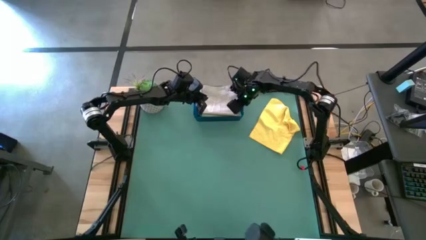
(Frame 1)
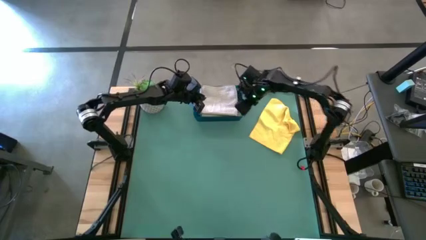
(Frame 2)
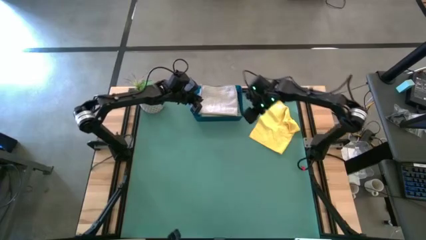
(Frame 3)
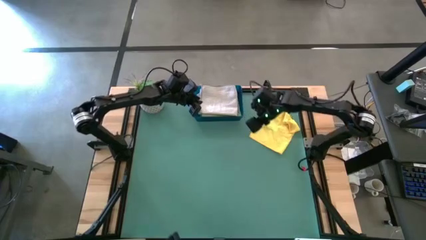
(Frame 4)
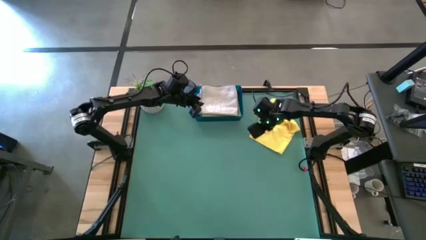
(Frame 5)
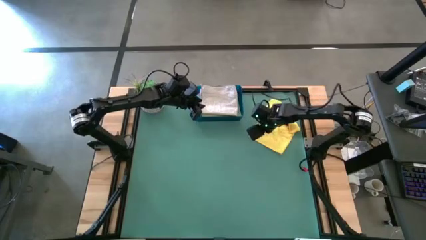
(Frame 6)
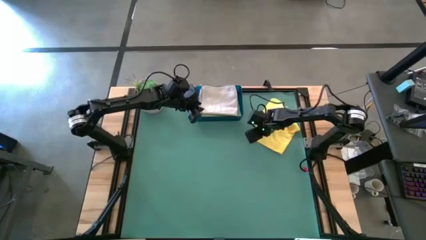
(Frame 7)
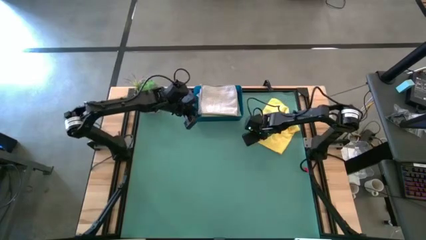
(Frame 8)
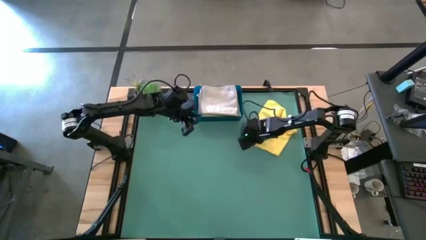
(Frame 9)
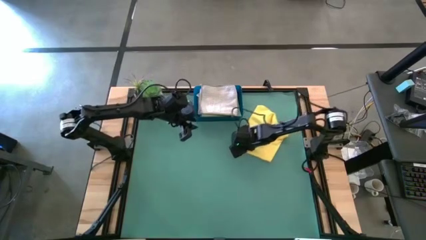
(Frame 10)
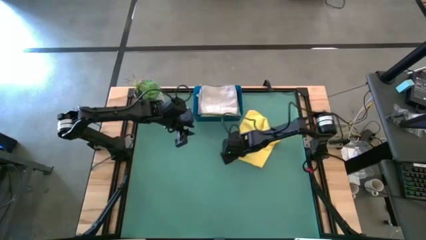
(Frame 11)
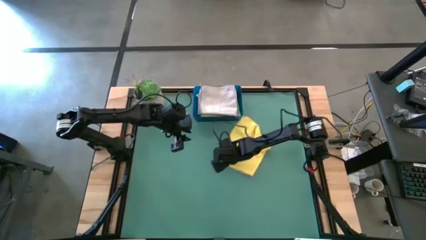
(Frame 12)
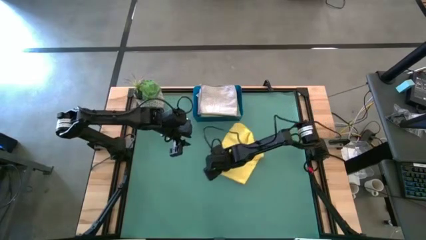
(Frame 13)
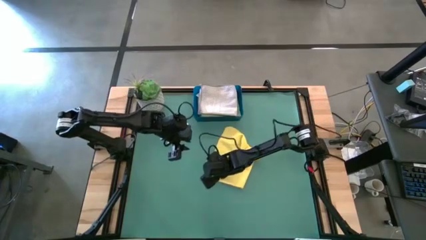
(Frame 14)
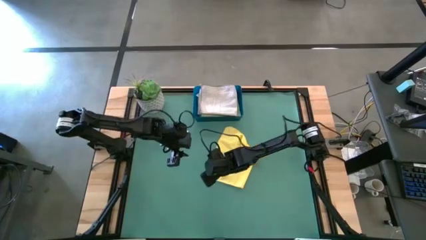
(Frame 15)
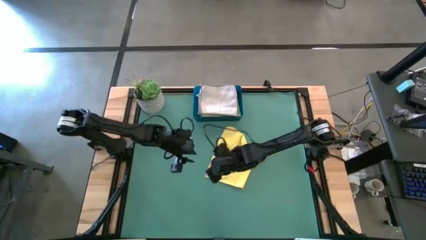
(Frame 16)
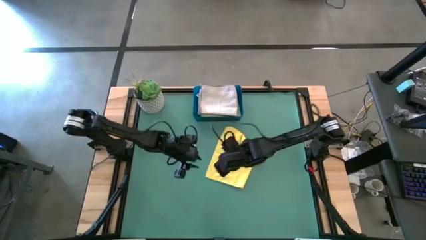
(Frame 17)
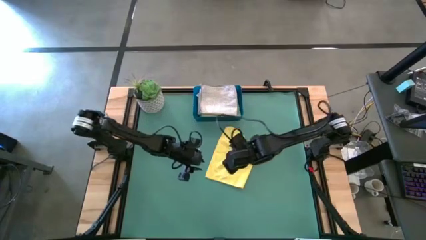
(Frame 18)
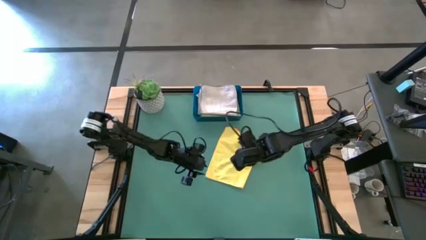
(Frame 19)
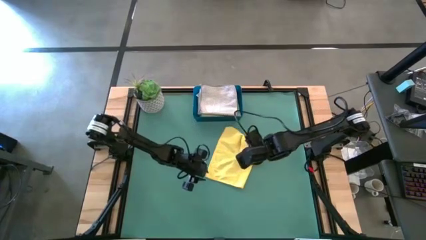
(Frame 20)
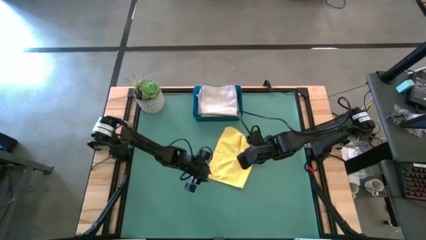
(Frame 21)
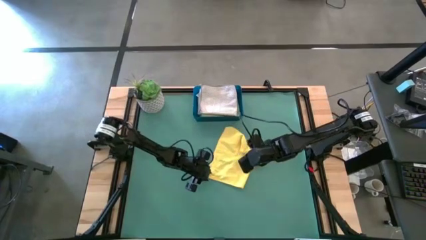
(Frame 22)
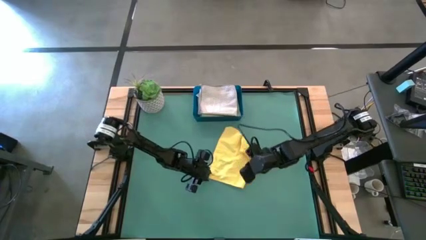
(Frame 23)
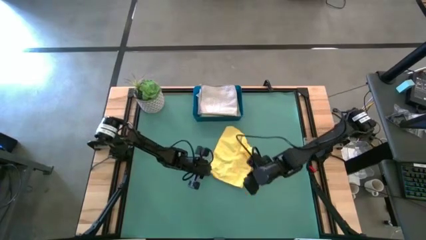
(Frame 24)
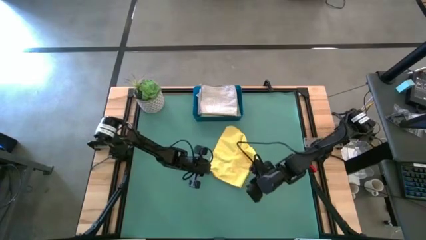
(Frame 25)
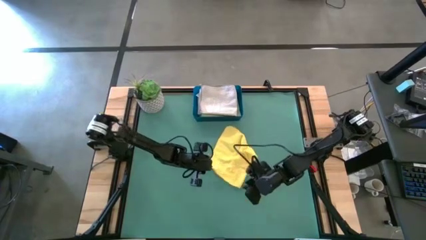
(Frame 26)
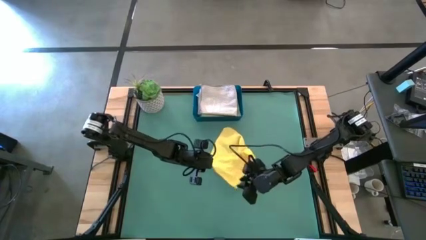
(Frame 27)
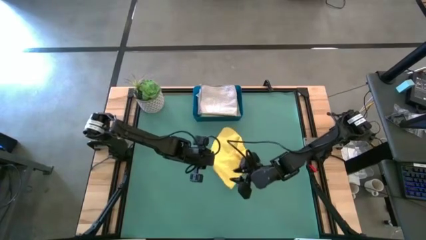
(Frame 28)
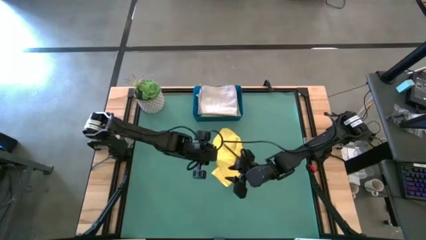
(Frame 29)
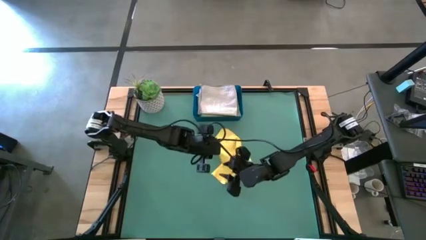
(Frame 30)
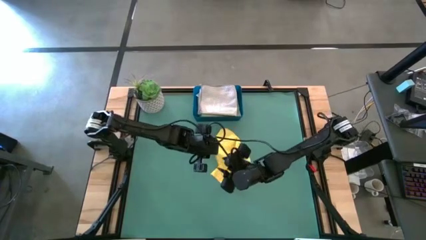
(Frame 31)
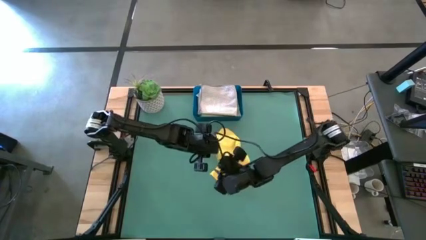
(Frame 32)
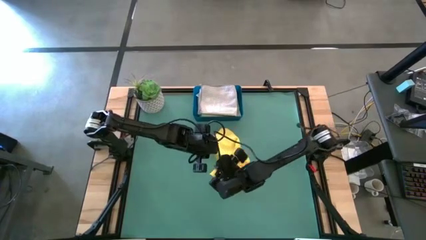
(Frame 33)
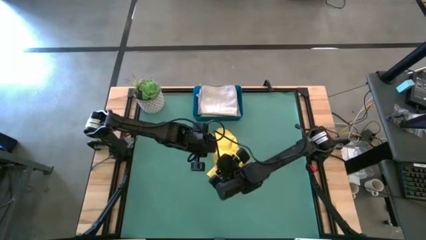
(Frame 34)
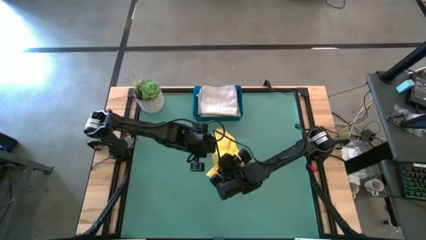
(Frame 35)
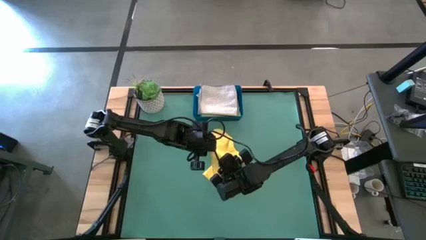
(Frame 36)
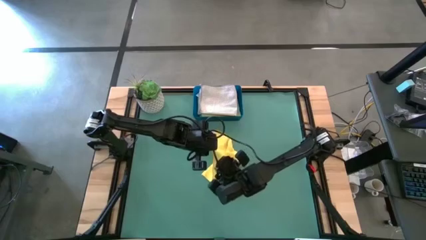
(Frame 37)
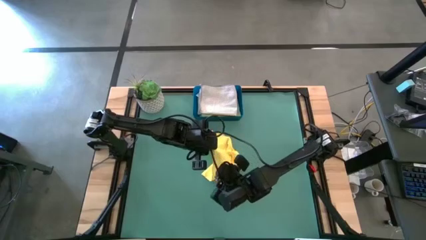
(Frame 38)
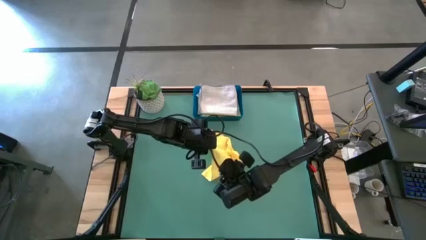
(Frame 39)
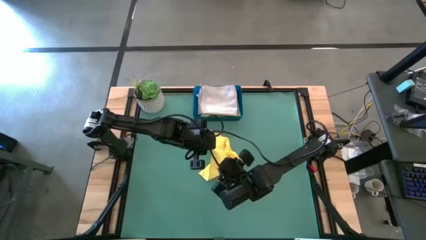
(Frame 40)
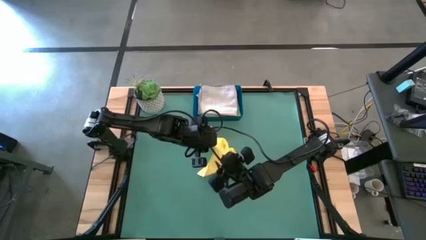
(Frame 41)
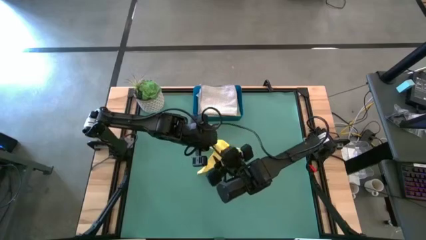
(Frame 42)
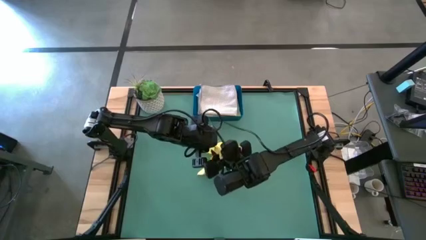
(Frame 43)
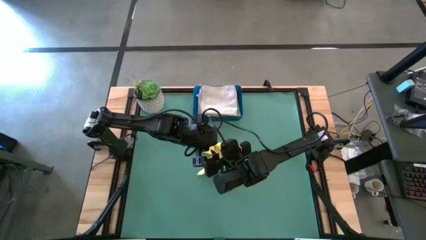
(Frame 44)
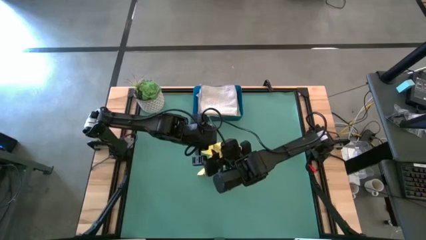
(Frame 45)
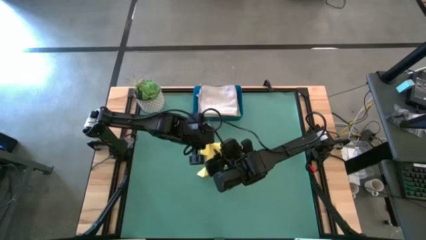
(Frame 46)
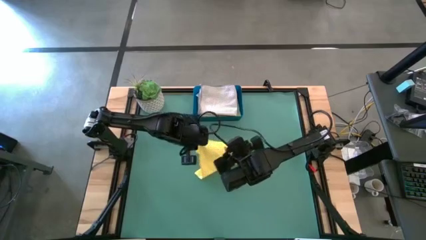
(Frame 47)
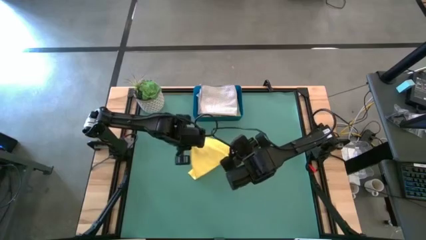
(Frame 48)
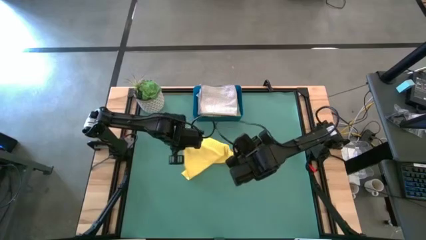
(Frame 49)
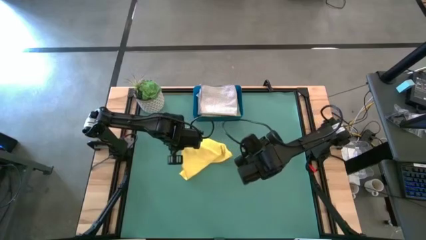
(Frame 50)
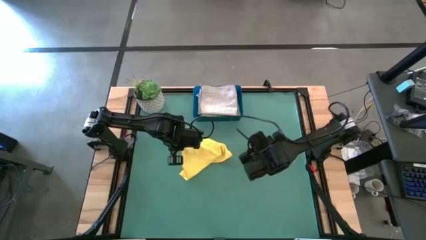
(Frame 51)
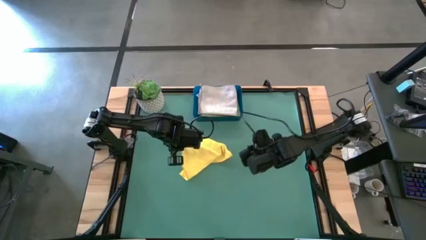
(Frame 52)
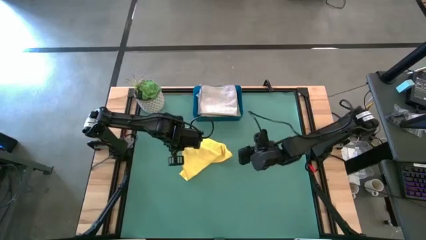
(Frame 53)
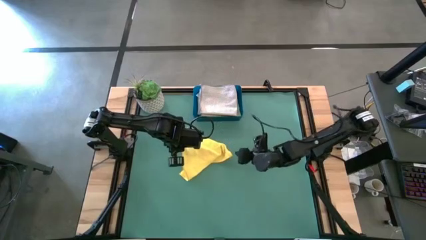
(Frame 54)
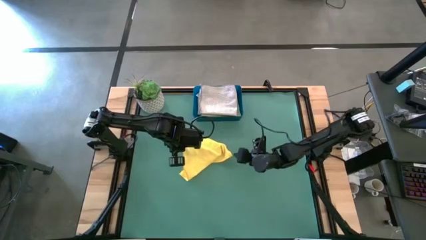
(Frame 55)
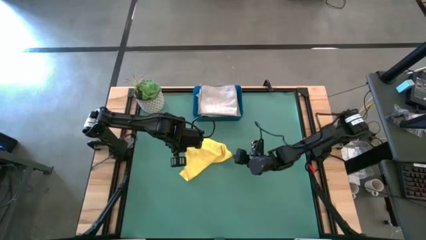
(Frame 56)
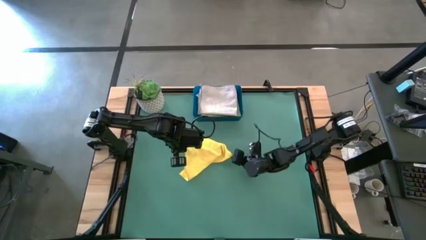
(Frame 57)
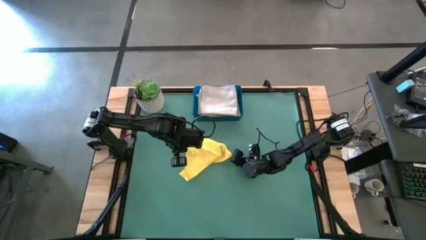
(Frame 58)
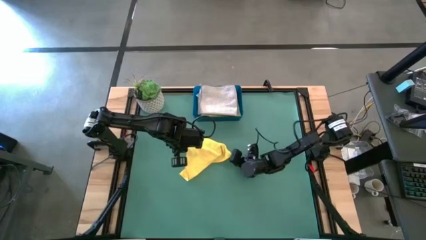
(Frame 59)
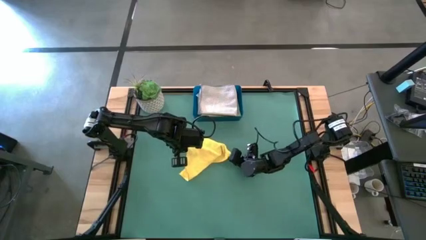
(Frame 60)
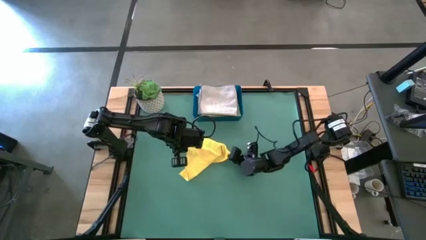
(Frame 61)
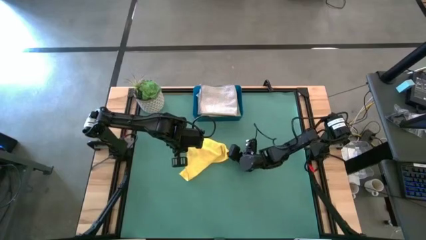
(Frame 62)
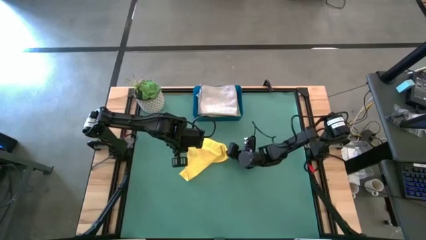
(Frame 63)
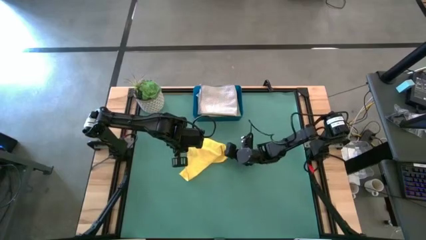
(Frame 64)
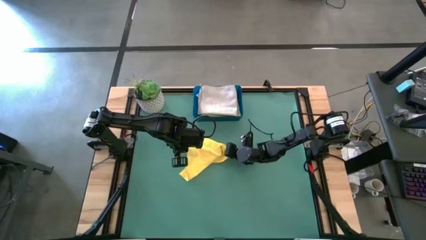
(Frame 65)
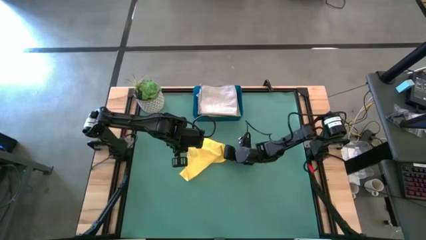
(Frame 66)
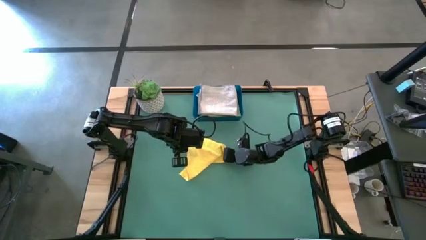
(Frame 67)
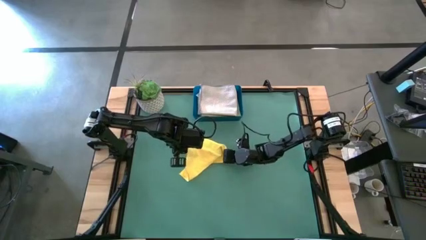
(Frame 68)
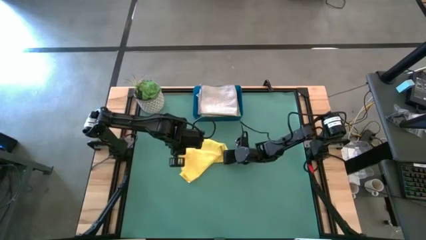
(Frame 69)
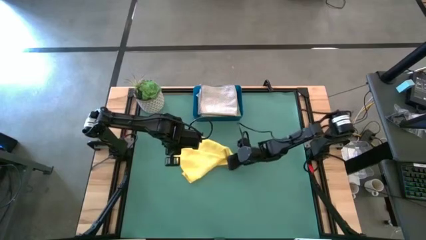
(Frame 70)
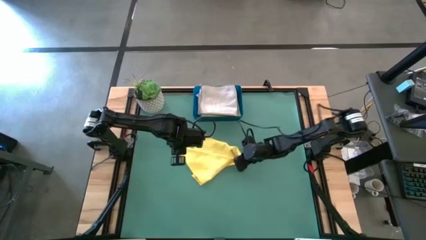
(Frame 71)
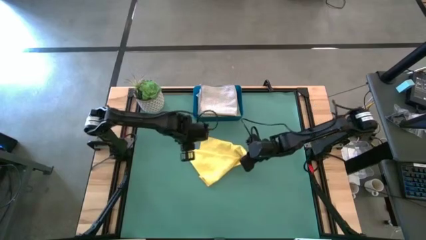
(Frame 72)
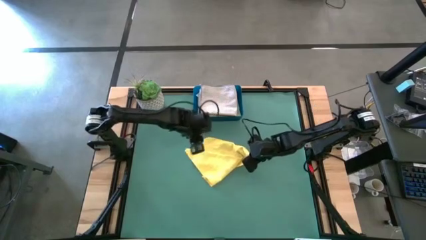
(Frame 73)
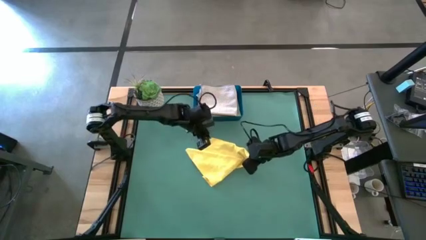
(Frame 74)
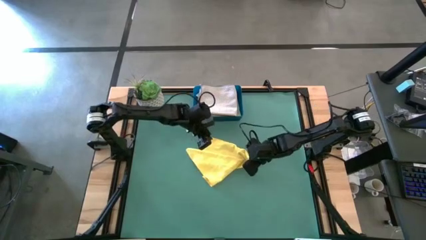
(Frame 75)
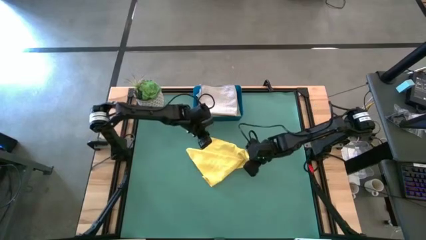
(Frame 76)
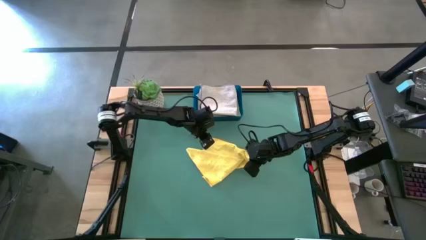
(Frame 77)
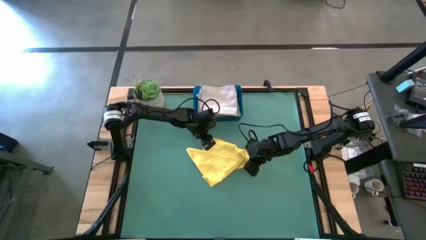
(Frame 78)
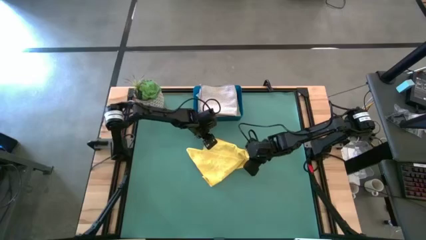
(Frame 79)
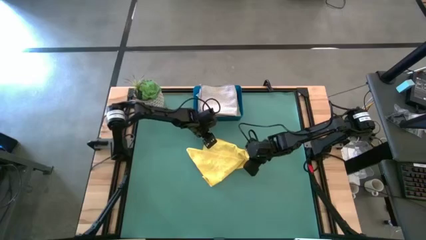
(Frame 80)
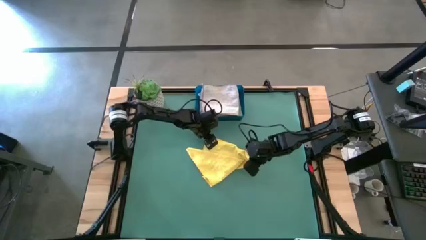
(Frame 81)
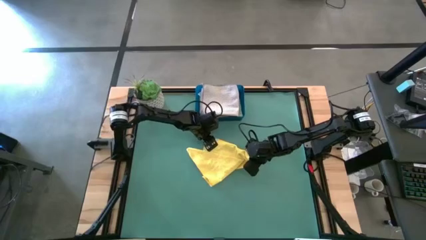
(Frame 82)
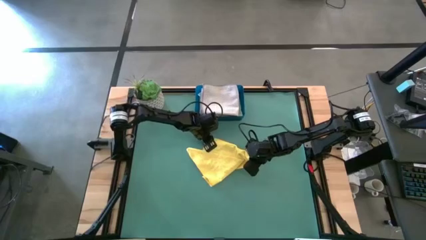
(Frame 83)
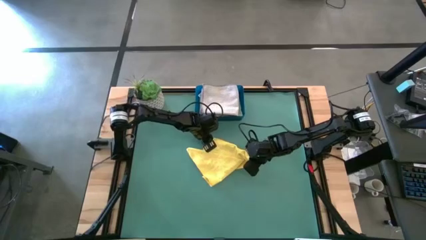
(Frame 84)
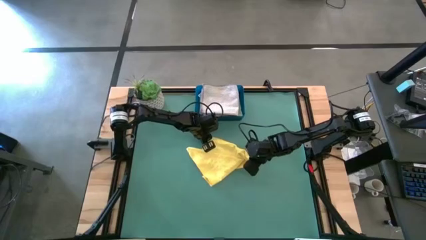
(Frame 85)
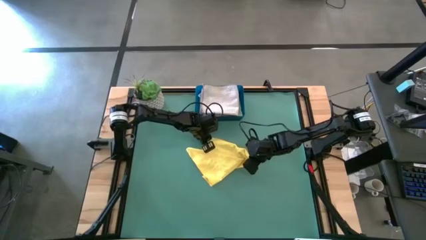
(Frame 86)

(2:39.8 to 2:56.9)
Task: Fold microfiber towels
Fold the yellow microfiber towel

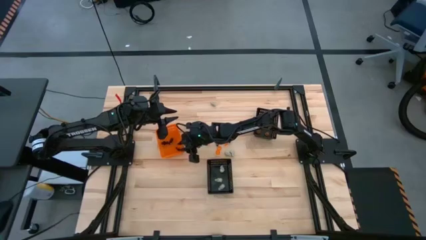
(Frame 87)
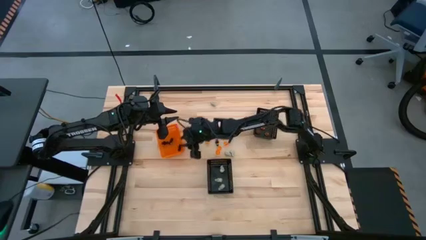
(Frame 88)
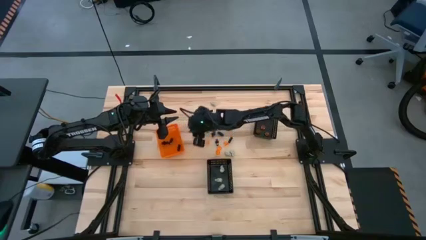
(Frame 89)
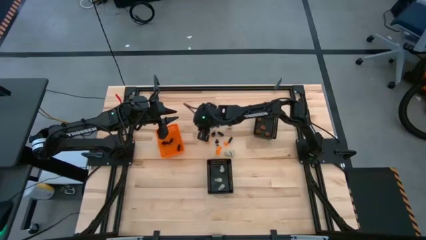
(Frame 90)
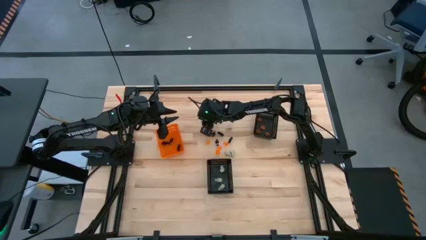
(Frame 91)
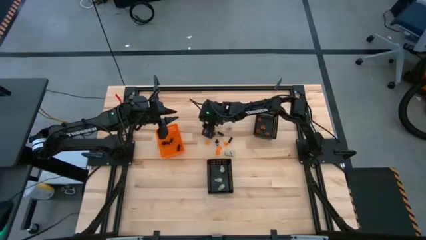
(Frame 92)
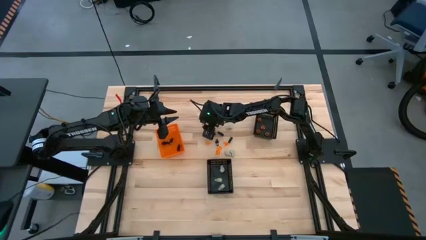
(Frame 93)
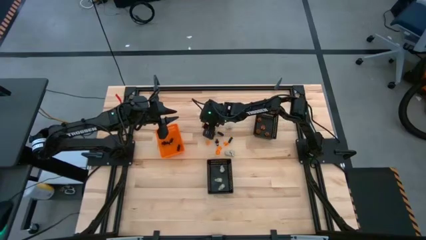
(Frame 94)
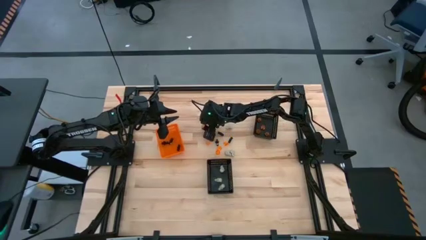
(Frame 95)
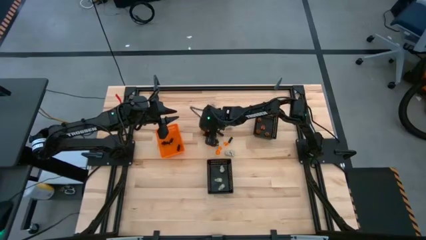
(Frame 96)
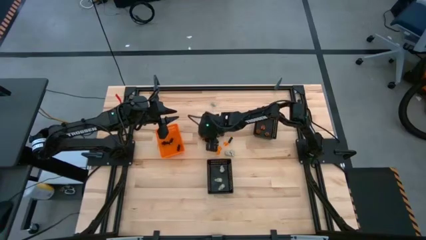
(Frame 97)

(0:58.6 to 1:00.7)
Task: Sort Halloween decoration
Put the orange pumpkin toy into the top black bin
